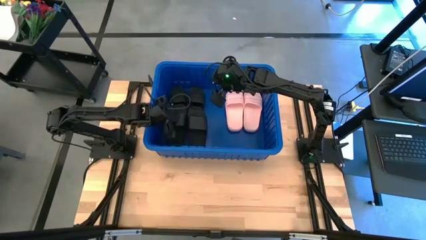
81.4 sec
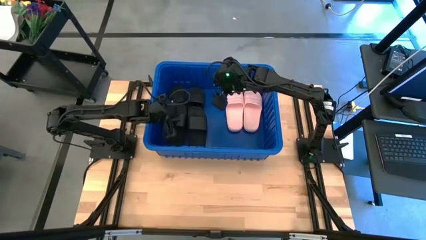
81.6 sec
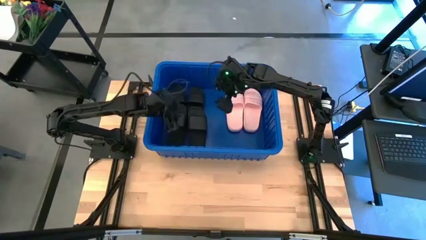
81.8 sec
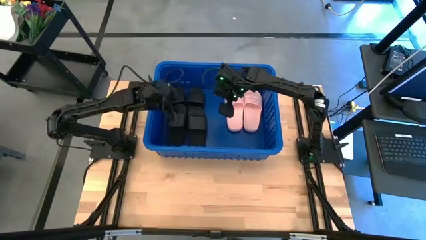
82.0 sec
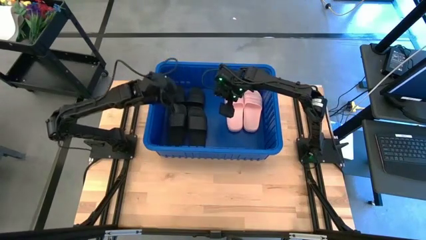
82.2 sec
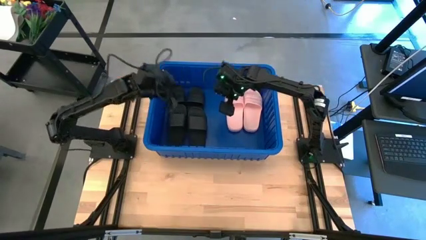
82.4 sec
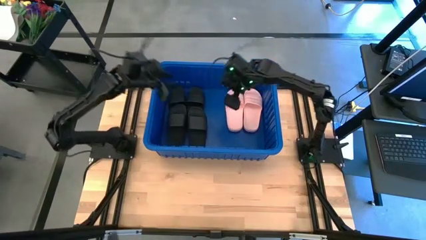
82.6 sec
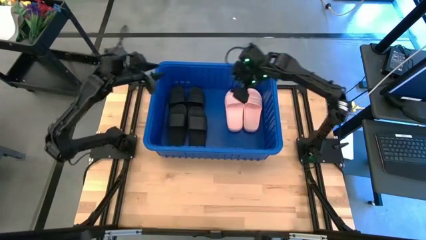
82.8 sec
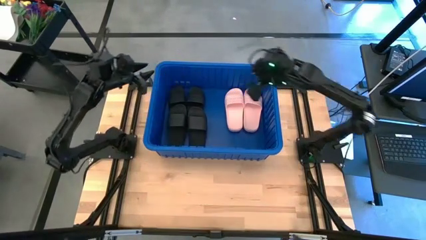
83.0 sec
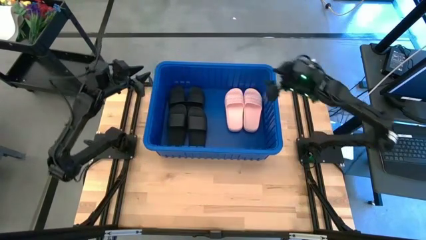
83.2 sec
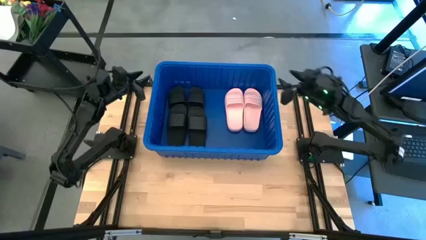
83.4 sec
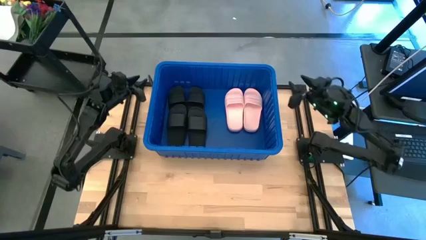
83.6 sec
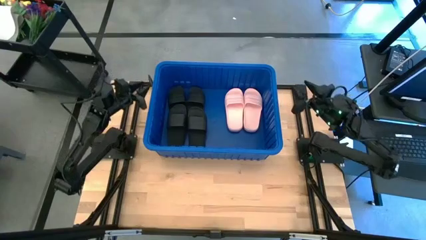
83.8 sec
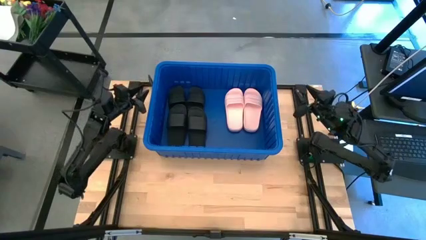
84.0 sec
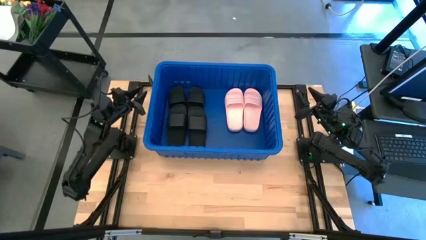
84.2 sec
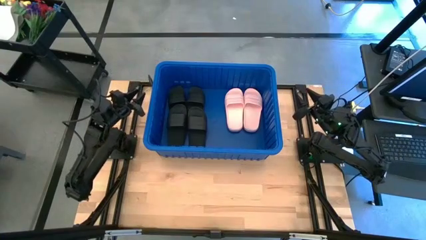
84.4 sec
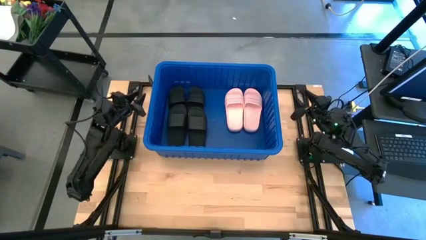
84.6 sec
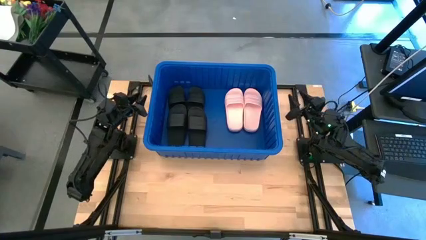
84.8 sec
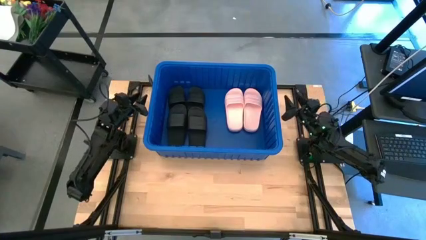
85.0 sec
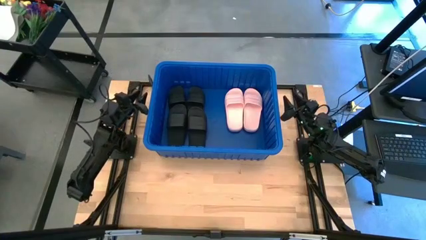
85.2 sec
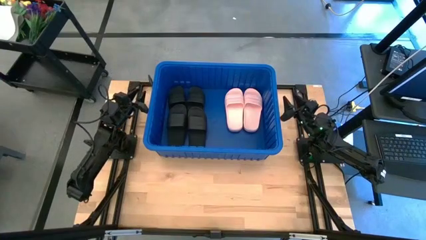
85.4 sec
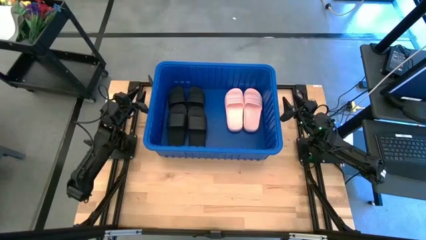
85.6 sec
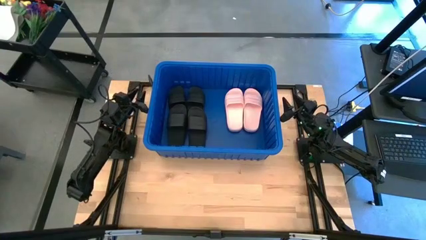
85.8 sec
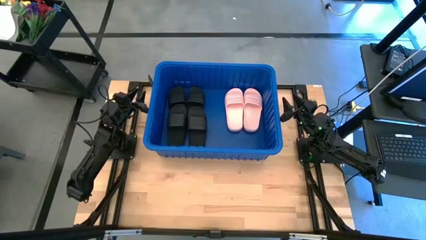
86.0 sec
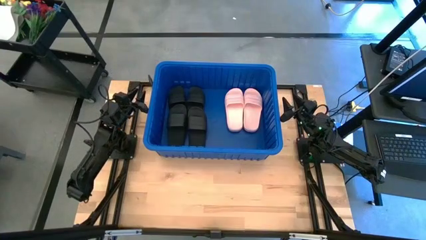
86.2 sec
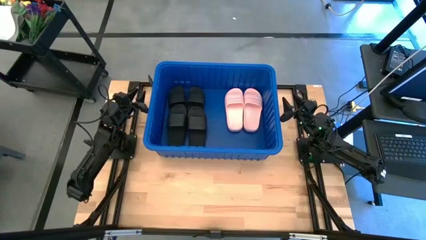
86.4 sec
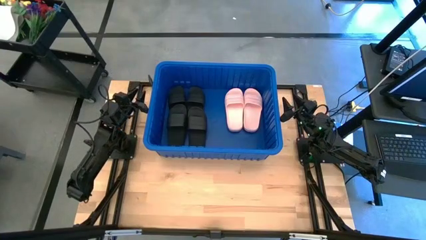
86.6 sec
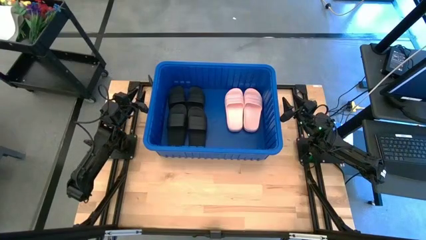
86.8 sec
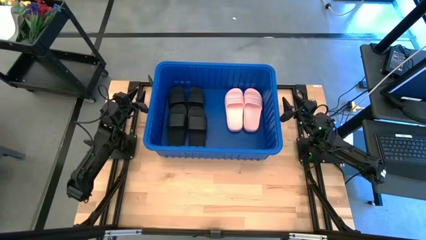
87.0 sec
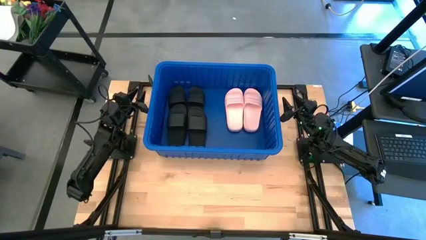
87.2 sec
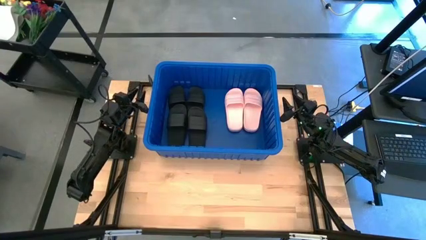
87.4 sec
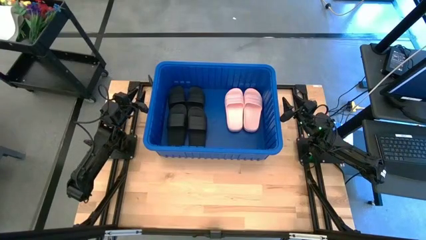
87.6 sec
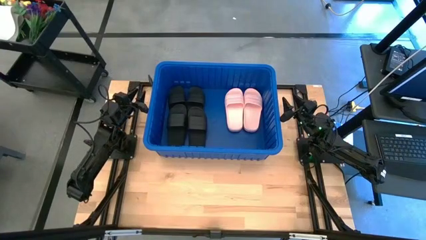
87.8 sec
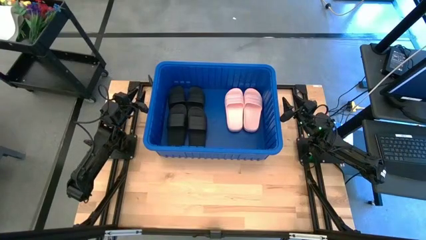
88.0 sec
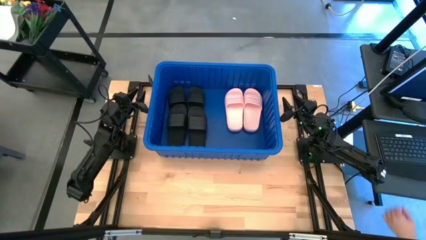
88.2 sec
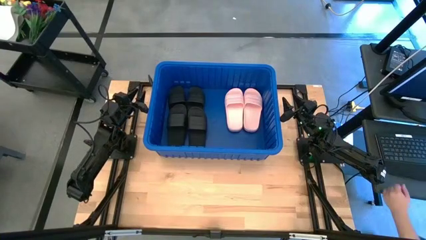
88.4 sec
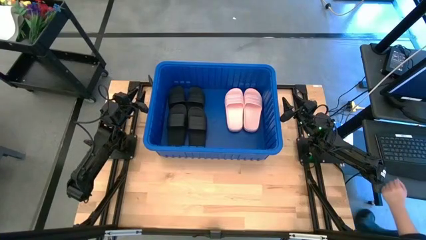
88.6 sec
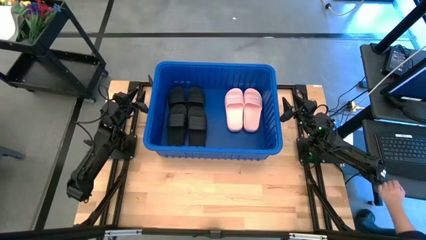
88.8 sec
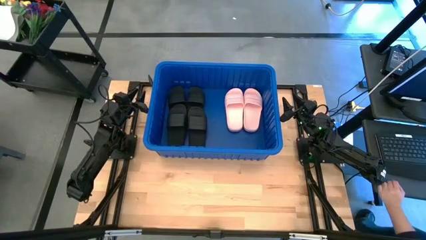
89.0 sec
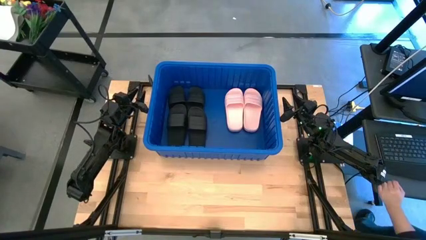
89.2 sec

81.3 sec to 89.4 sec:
Task: Pick and place slides into bin
Return to Home Position
